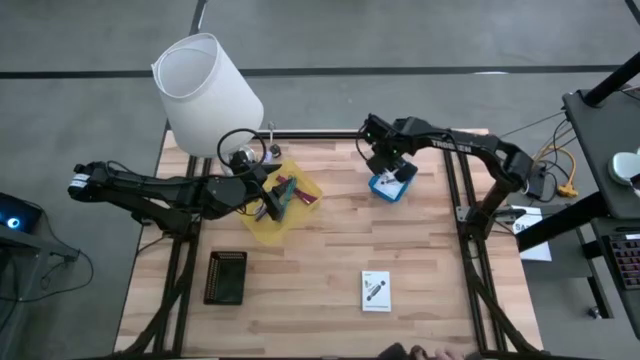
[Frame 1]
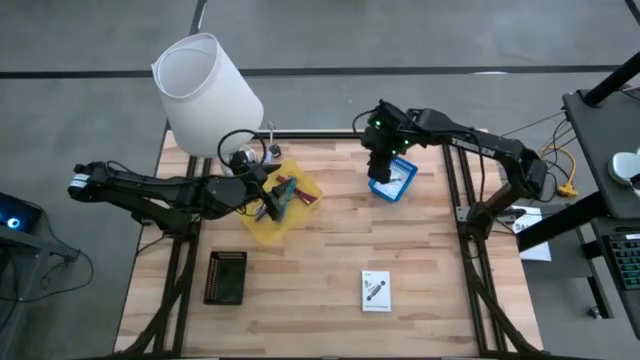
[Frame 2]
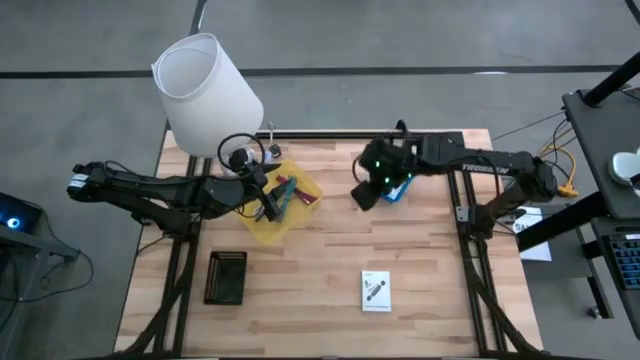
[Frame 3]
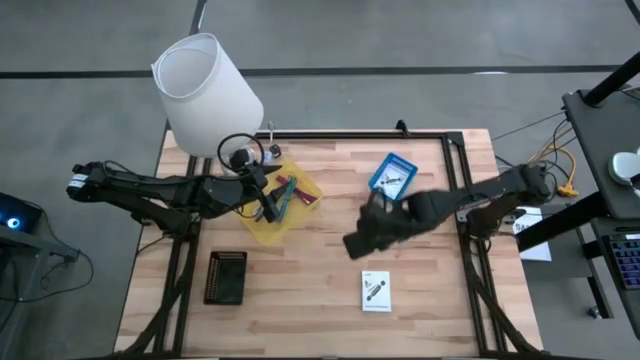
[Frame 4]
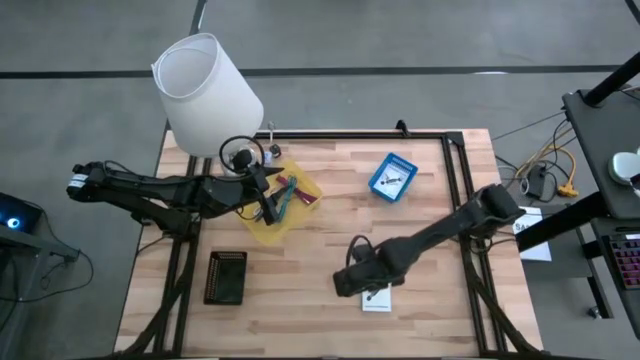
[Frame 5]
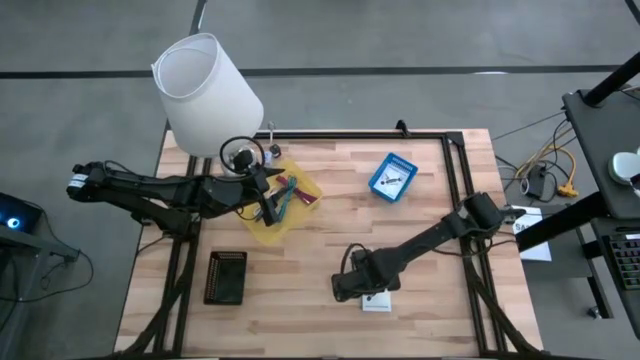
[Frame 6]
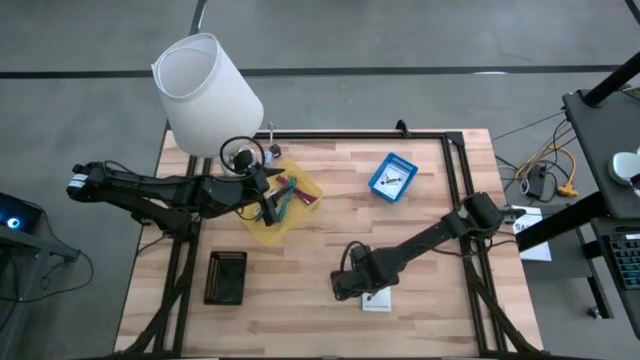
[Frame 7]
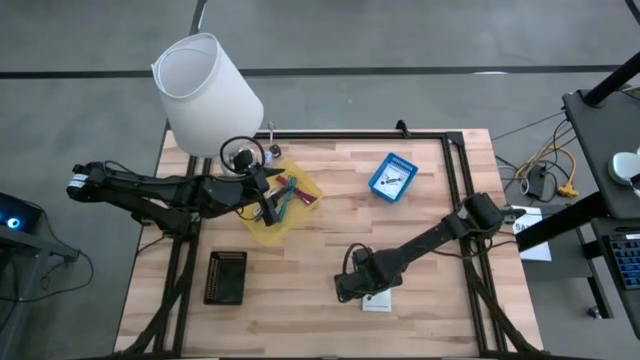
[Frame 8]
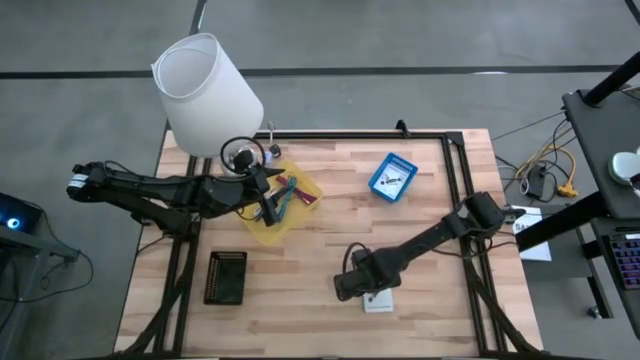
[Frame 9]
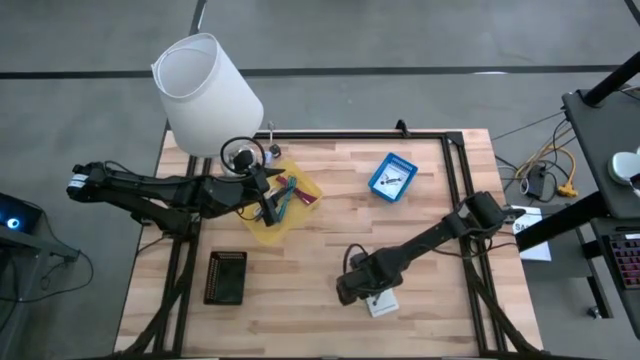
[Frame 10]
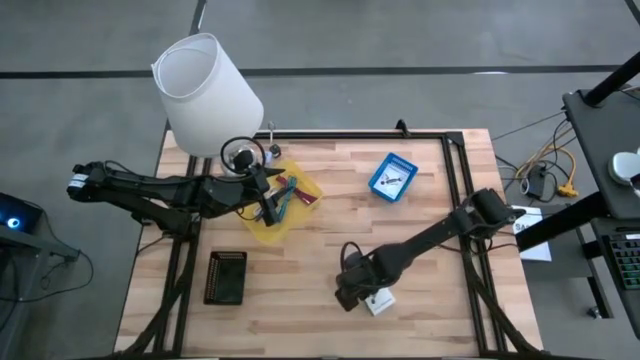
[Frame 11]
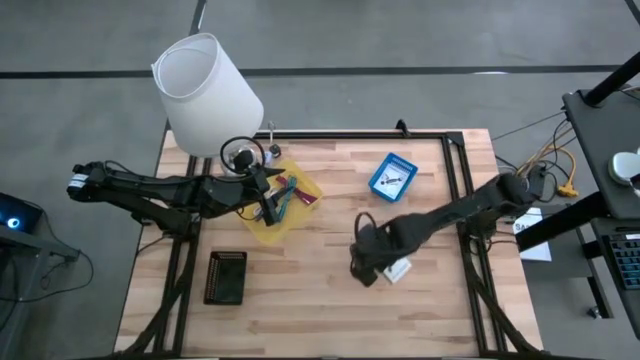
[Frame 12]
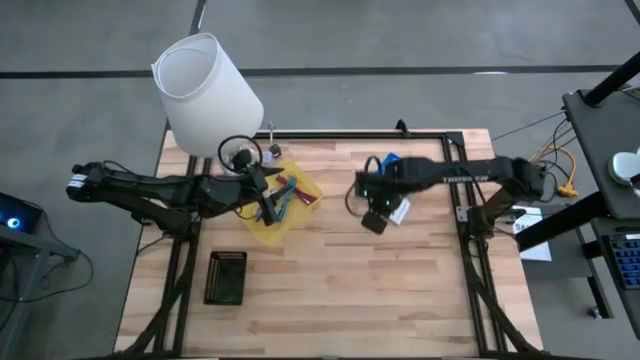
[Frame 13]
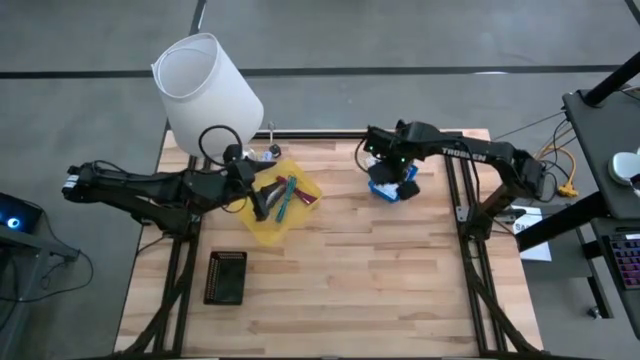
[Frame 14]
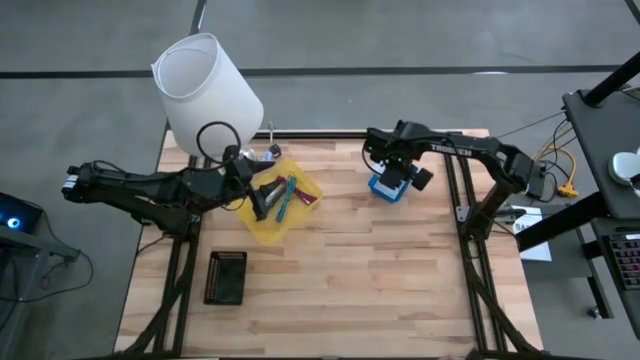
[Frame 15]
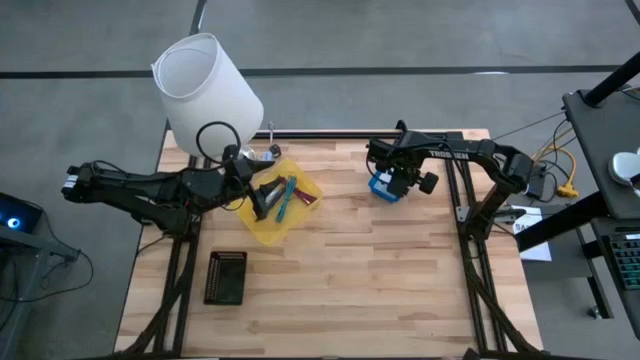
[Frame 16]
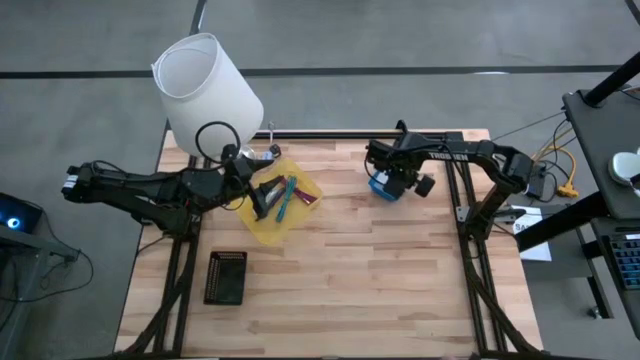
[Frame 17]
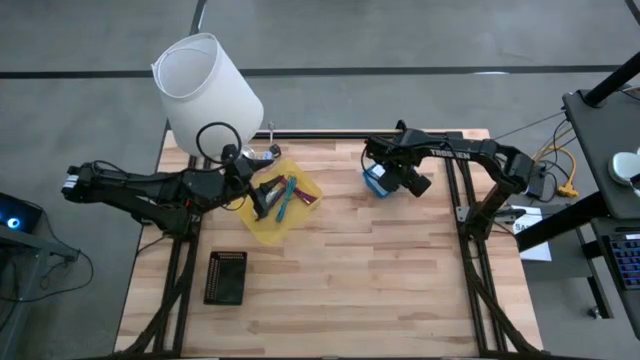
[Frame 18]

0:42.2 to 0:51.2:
Task: Pick and place items into bin
Stack the card reader box on top of the card reader box in the blue bin

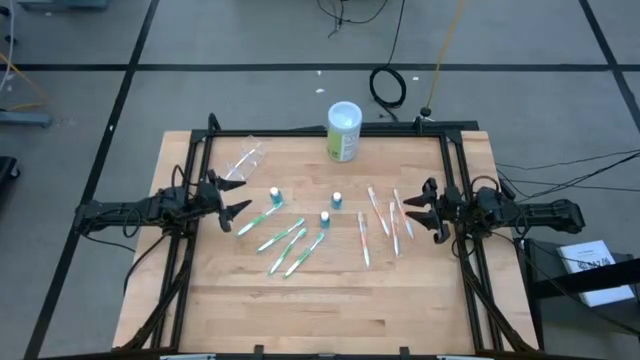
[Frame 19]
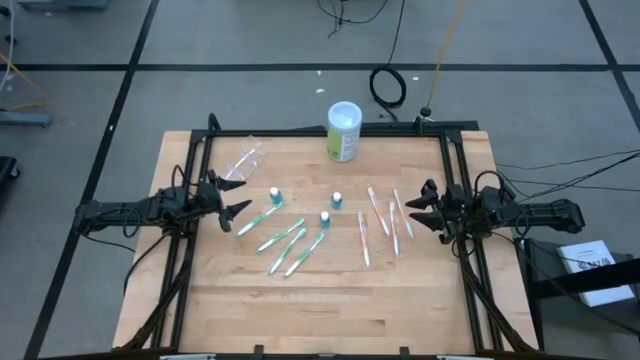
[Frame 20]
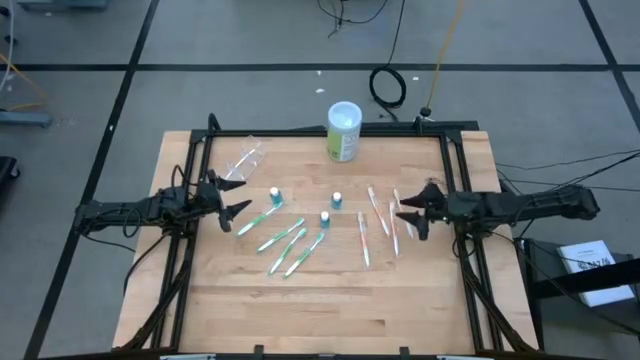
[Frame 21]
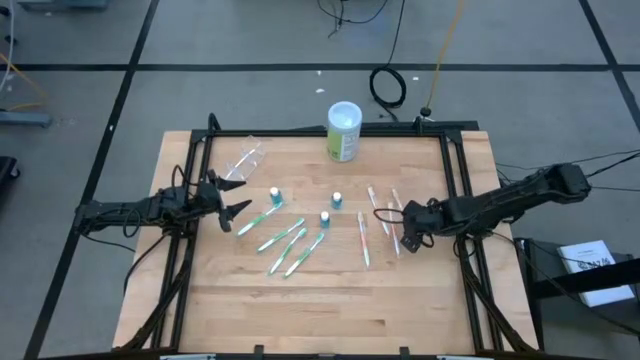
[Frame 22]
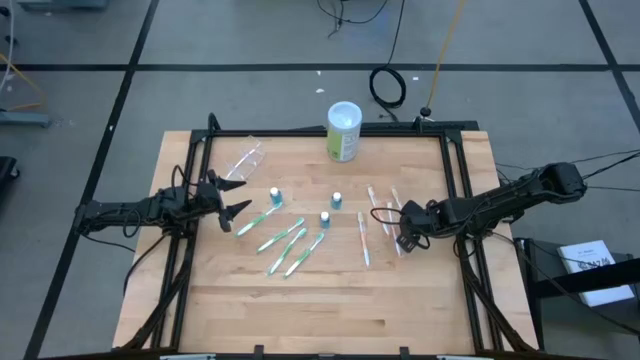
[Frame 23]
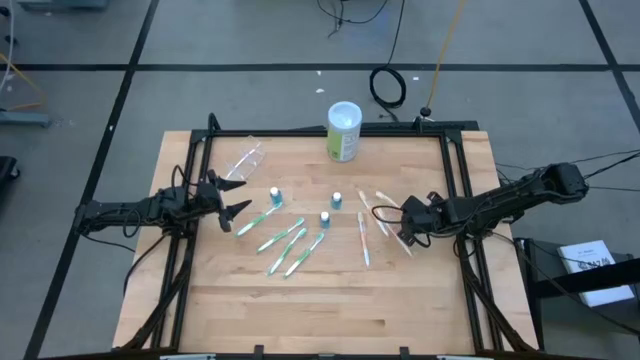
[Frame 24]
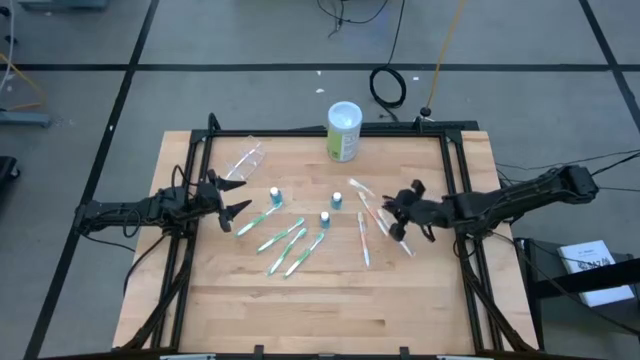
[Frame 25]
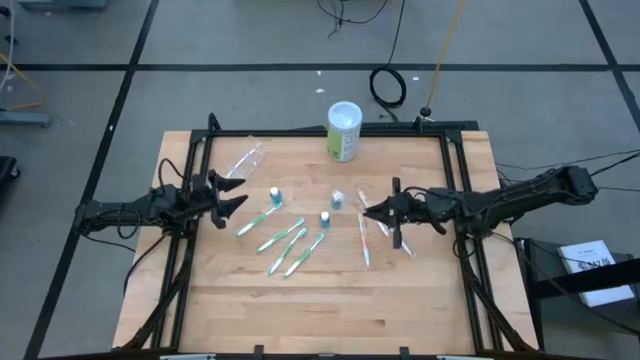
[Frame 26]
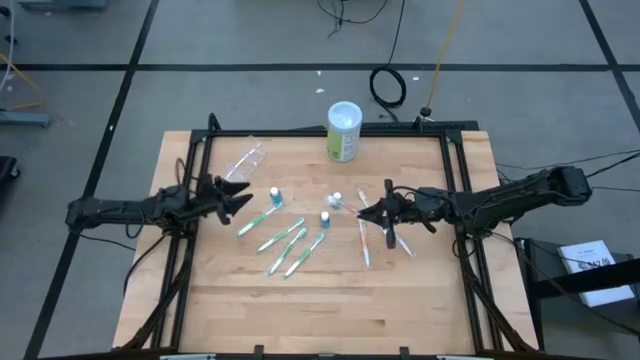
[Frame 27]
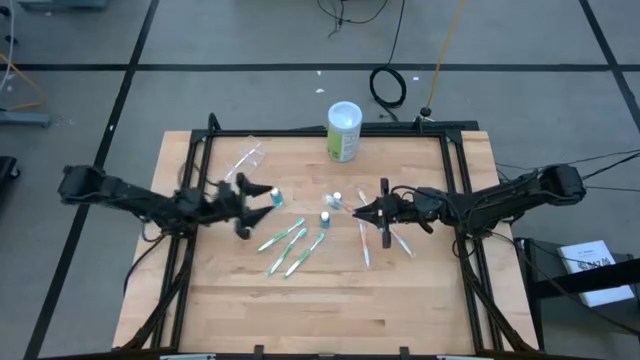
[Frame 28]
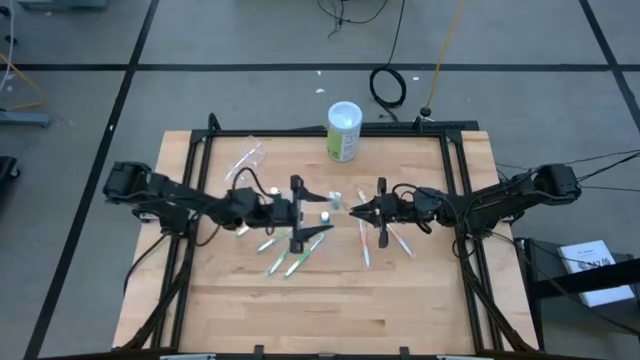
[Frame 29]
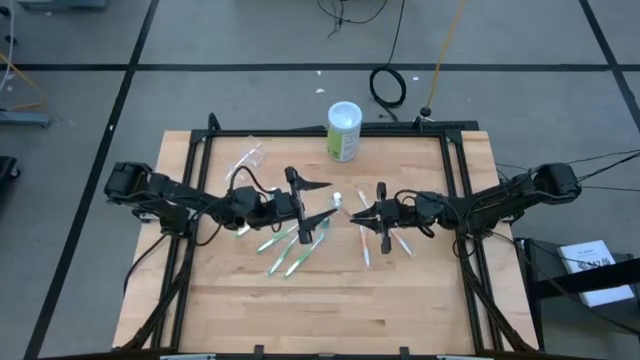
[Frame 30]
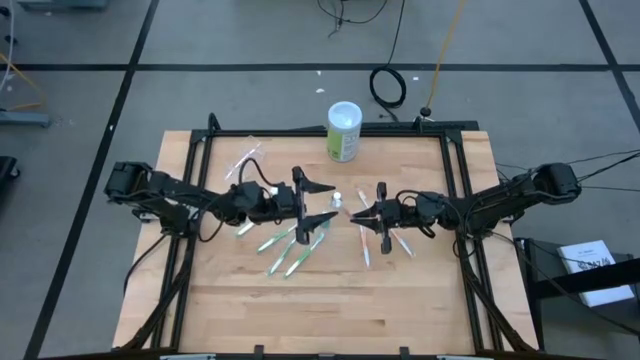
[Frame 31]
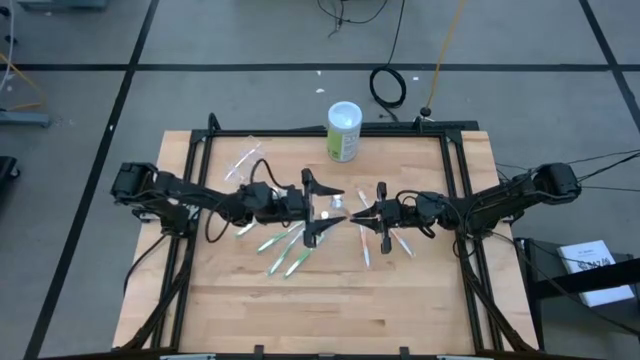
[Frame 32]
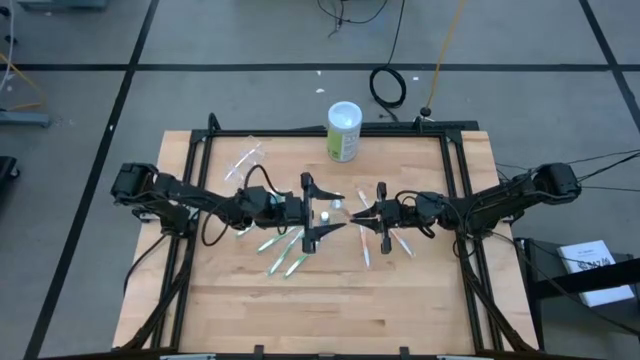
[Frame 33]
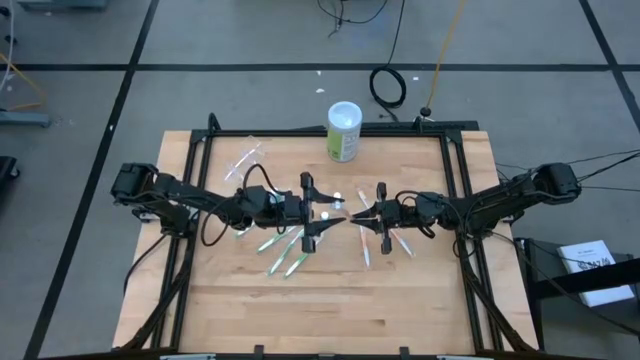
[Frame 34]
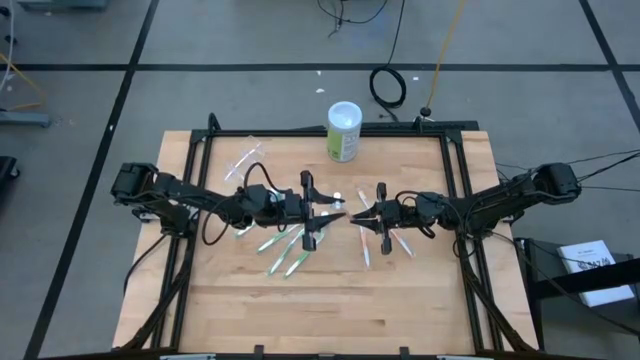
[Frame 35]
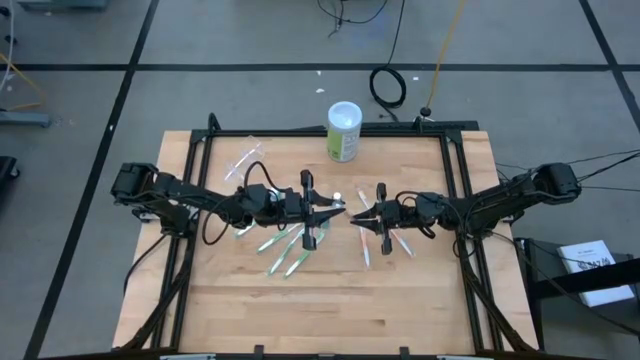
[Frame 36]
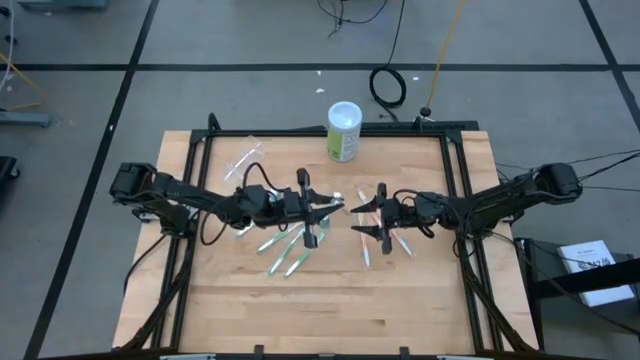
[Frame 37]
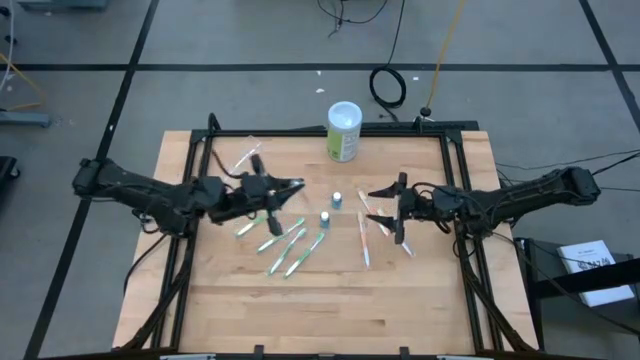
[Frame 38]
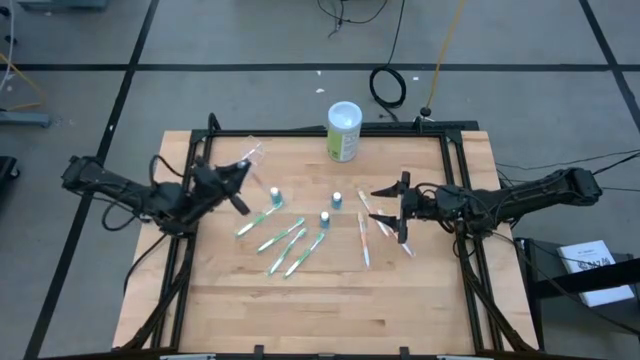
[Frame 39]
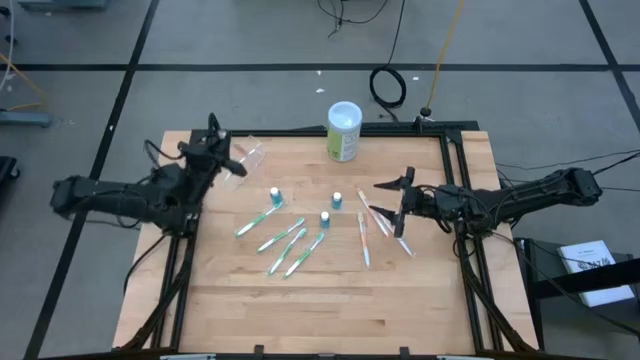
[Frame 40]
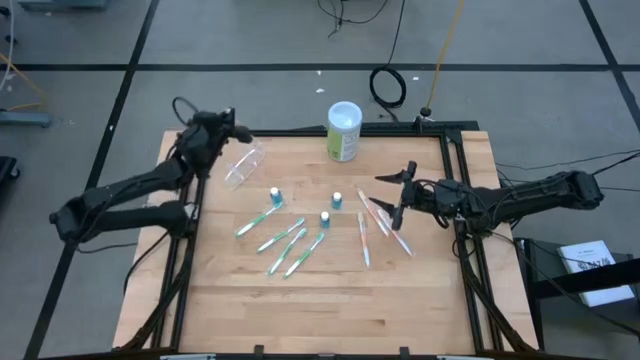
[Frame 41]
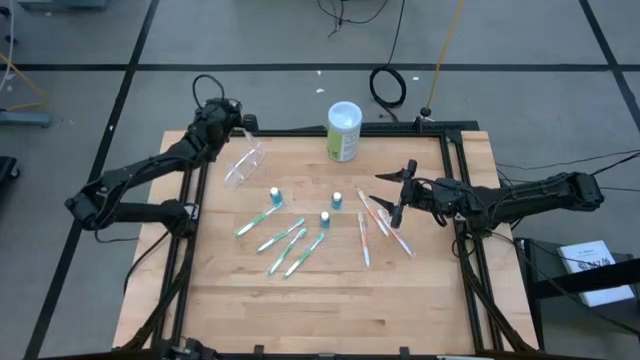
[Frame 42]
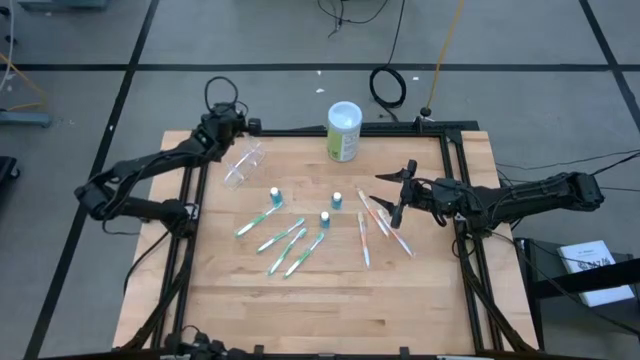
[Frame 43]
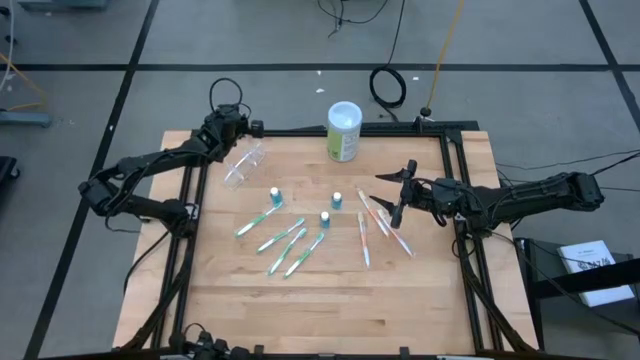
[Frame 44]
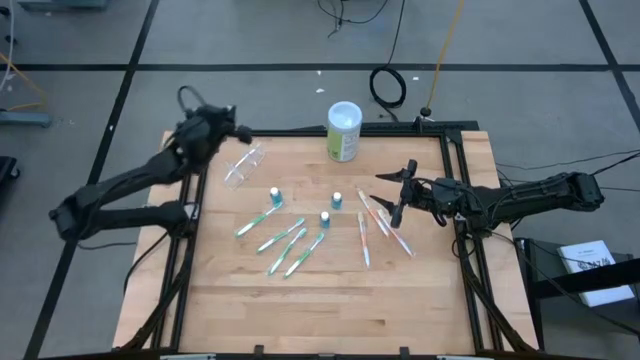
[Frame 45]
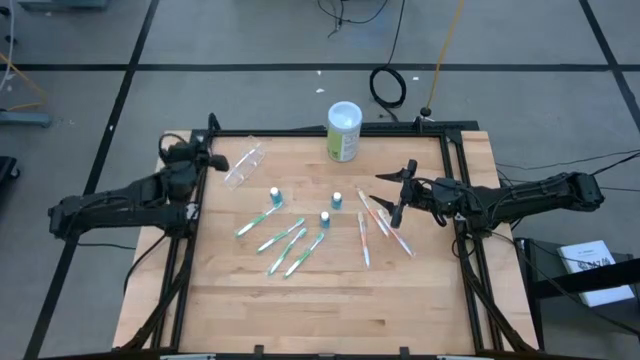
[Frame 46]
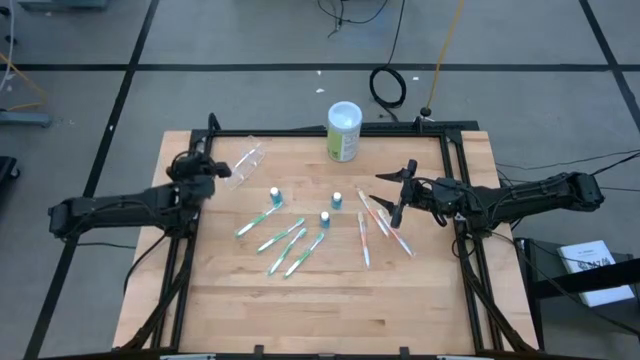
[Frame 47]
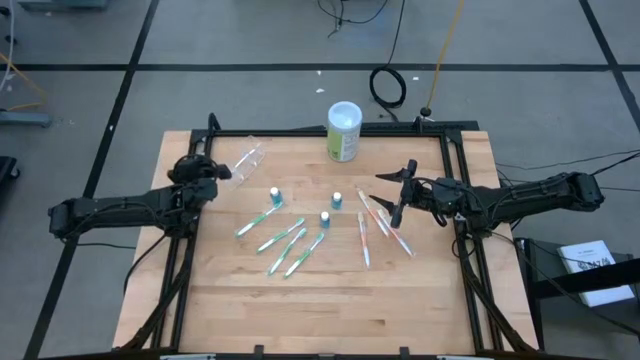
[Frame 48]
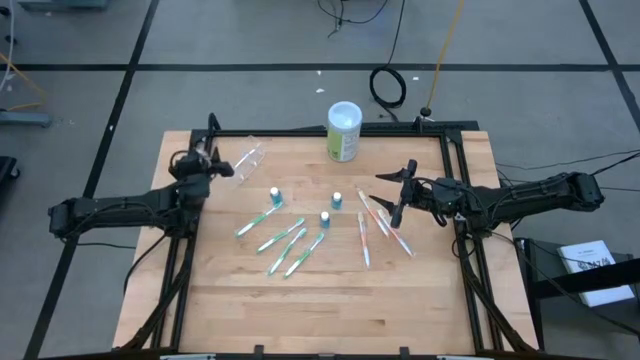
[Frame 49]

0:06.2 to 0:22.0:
Task: Pick & Place toothbrushing station
Put the orange toothbrush into the left section of the transparent organizer
